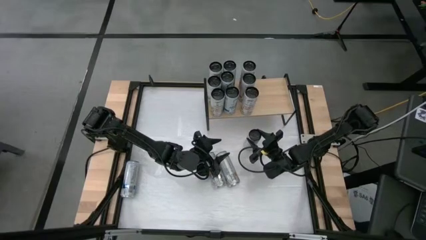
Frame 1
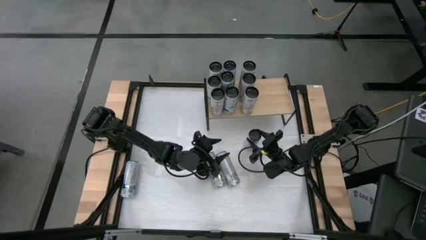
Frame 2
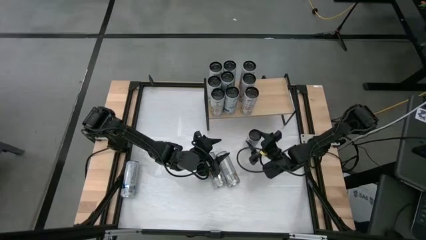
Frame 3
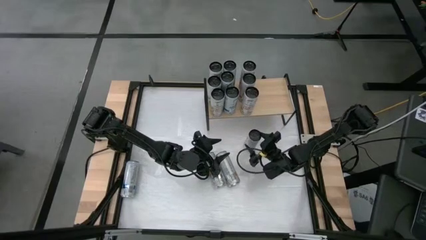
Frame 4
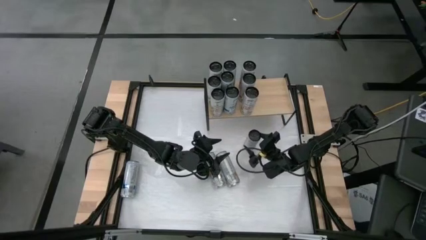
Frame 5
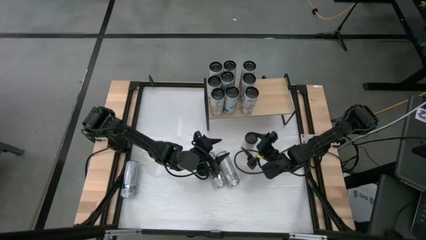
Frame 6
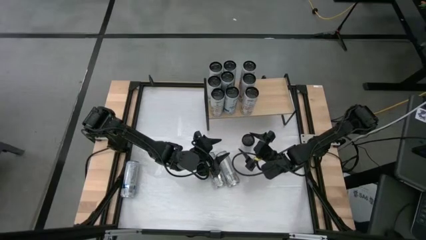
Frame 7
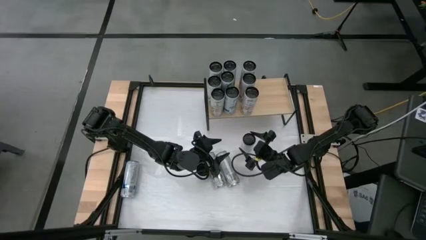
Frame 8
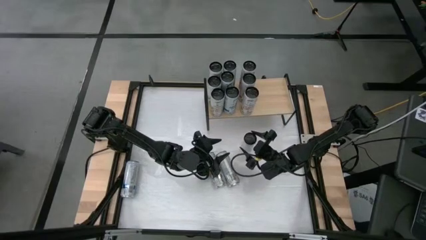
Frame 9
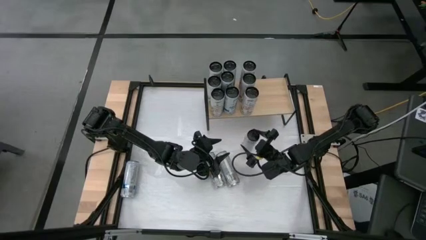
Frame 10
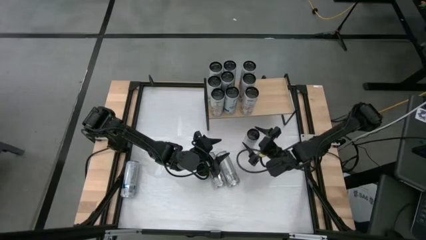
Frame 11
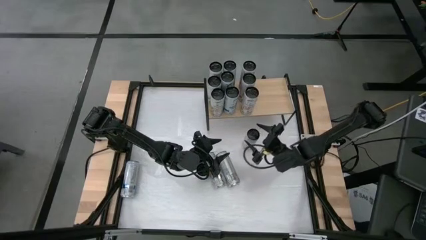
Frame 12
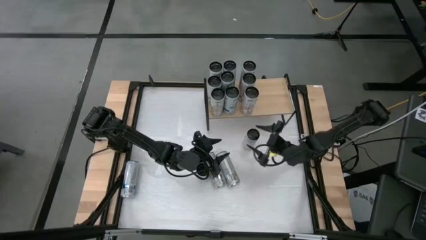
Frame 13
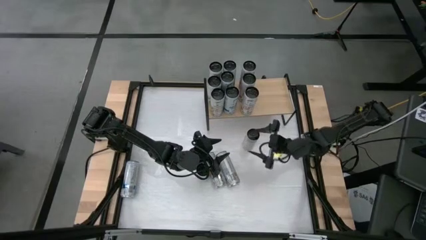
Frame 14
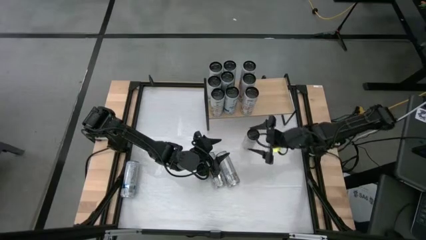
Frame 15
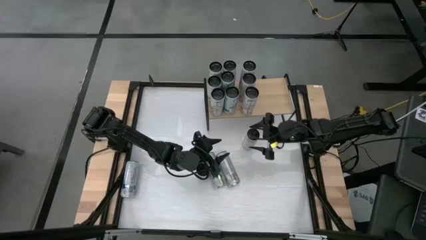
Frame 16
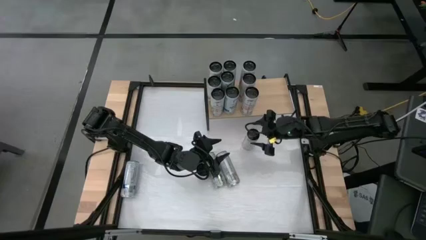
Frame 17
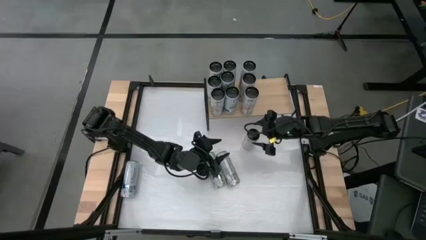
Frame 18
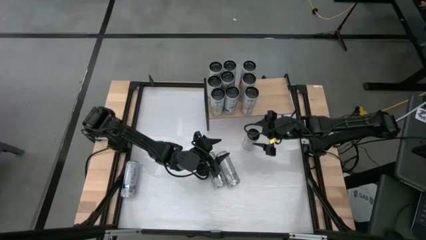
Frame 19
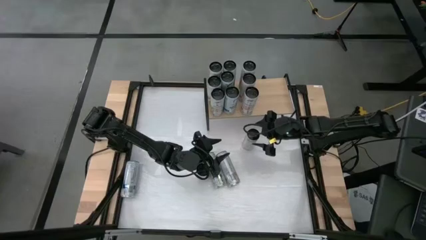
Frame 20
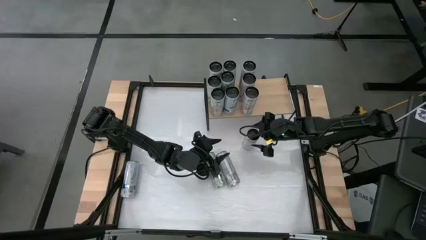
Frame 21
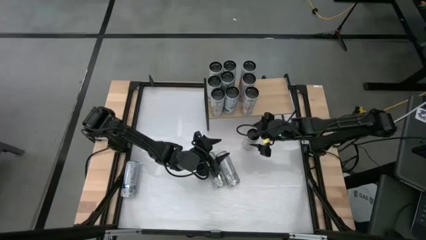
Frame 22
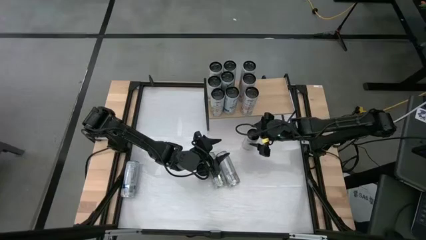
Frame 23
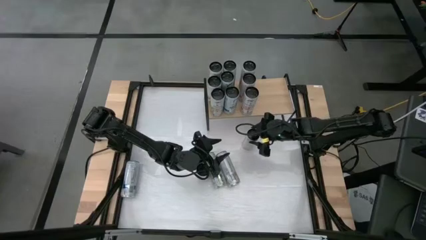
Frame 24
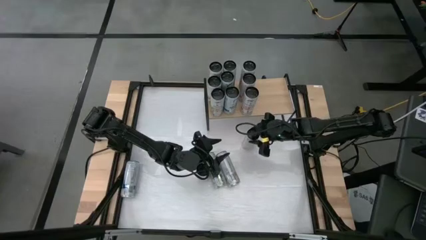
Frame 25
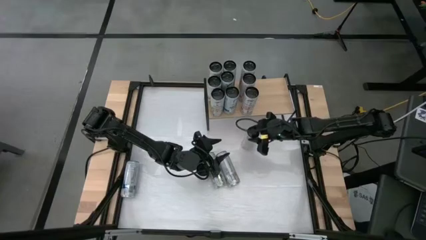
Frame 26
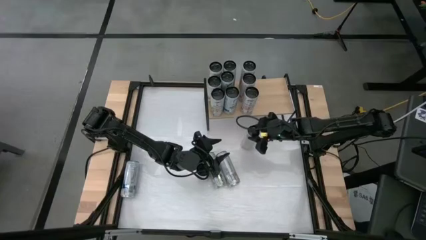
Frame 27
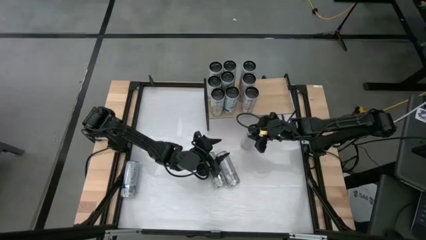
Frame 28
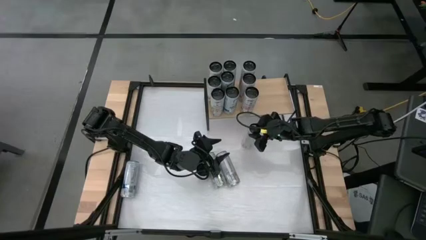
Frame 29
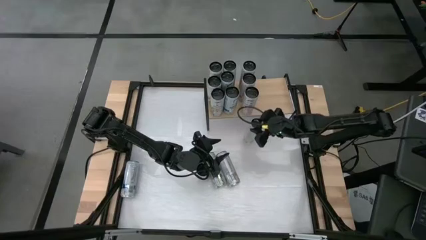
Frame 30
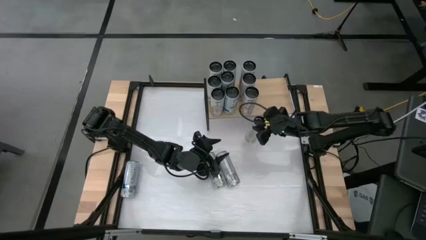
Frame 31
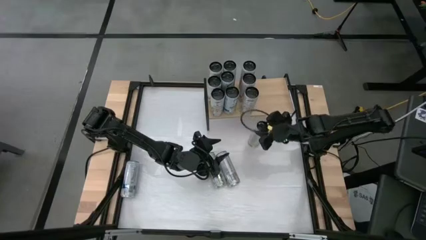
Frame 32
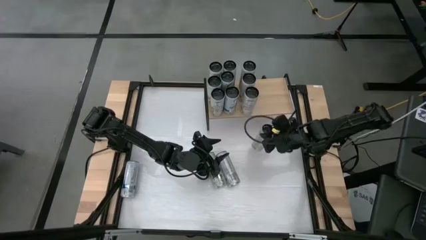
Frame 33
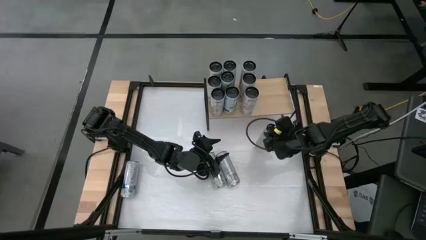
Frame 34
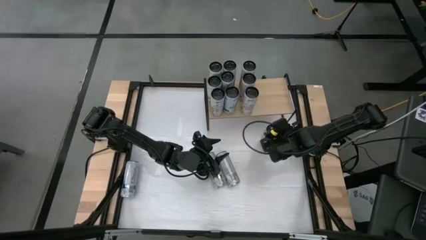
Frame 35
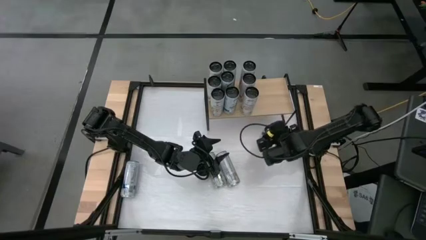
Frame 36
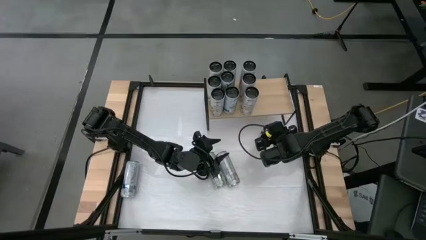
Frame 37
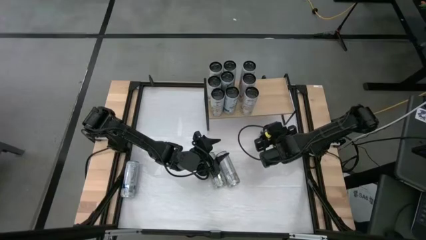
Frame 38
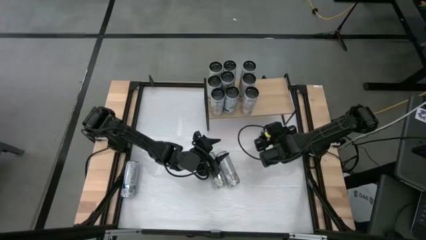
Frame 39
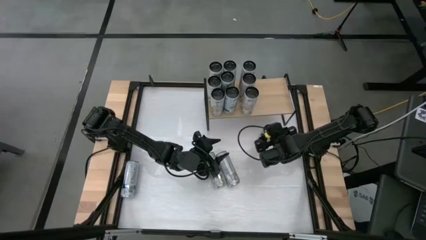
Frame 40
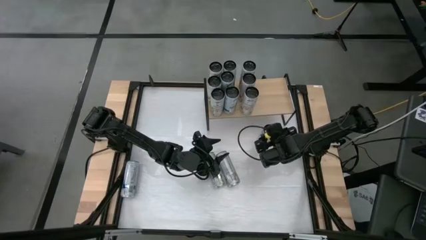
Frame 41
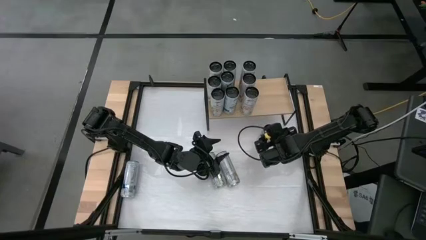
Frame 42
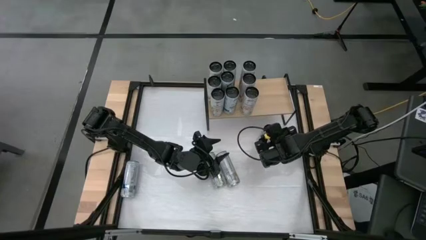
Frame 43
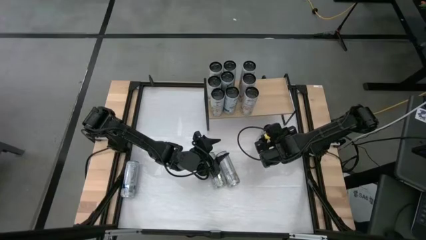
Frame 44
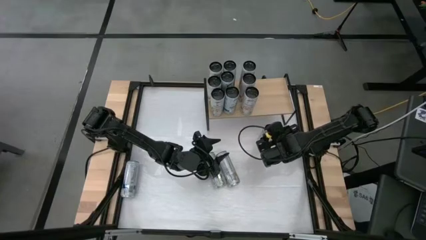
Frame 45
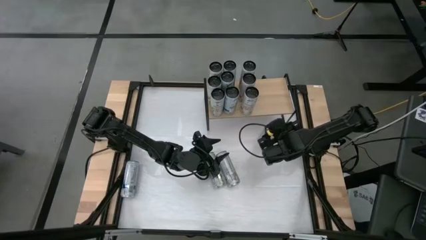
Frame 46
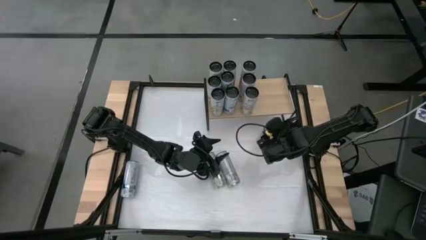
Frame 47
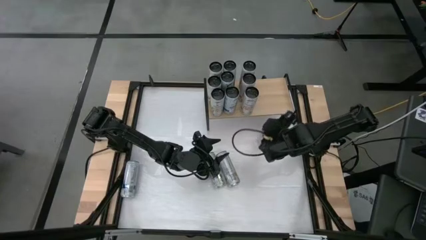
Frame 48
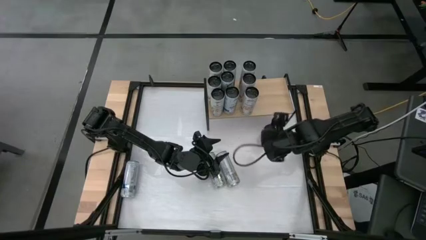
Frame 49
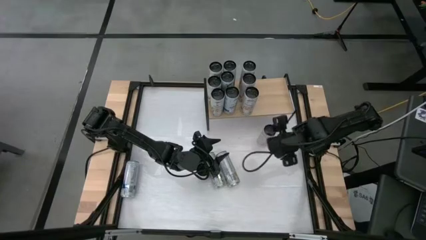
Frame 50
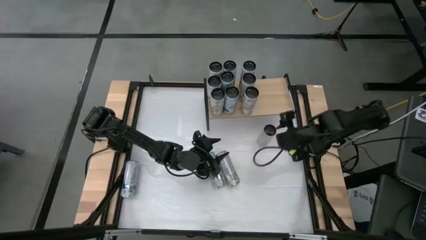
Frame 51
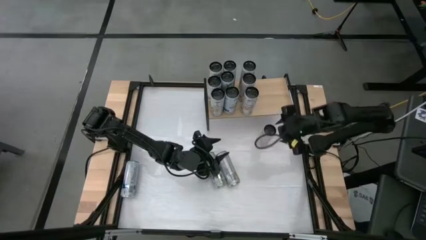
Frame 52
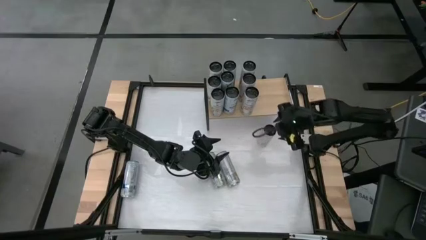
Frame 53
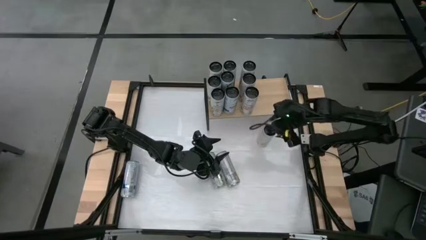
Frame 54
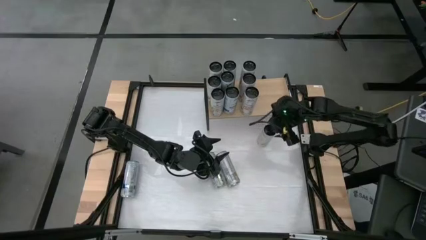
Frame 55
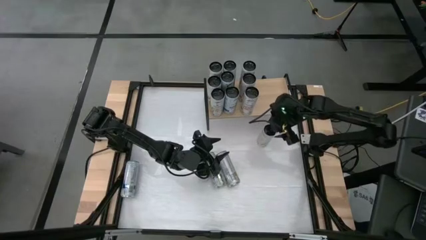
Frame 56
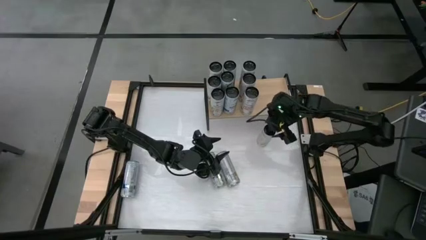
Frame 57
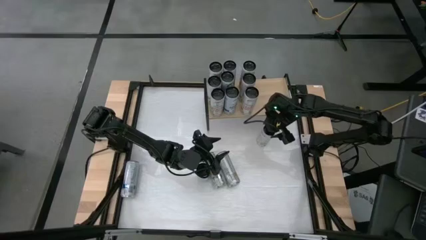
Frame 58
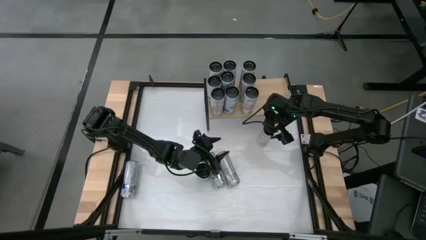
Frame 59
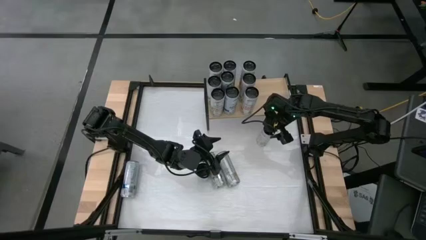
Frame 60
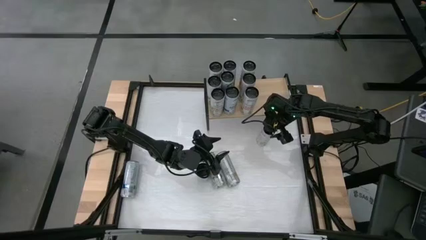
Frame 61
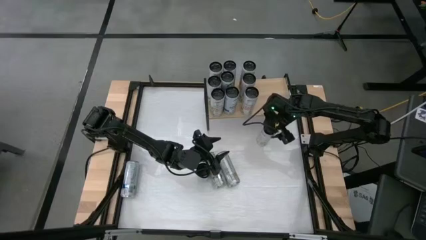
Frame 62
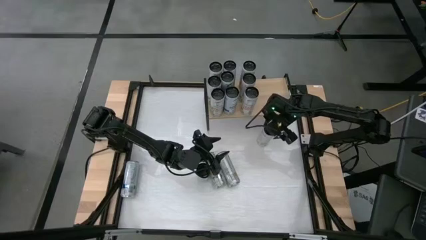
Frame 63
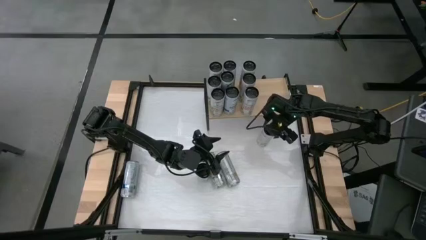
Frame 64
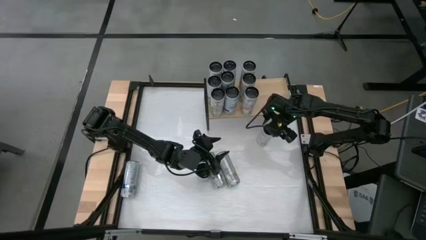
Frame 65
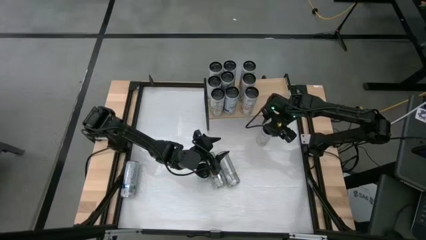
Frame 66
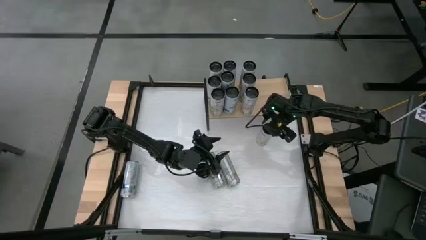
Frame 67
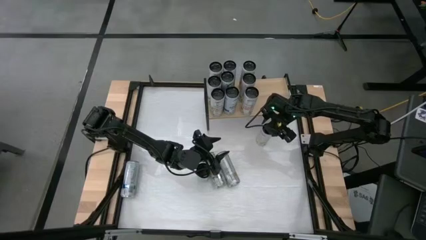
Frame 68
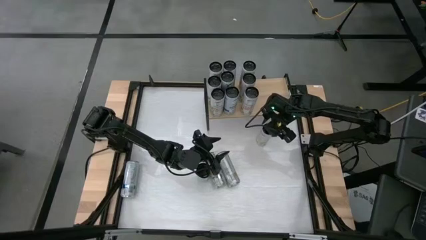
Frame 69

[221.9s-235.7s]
Task: Place canned beverage on shelf
Put the orange soda can on the shelf
